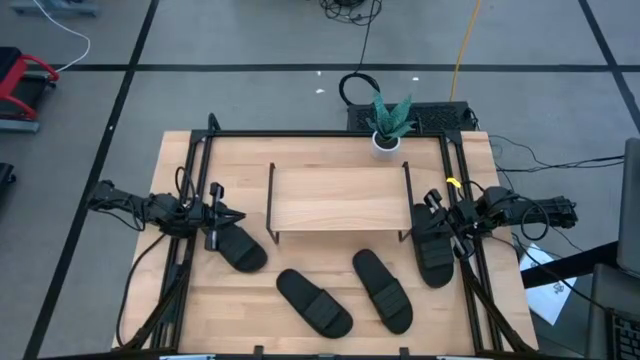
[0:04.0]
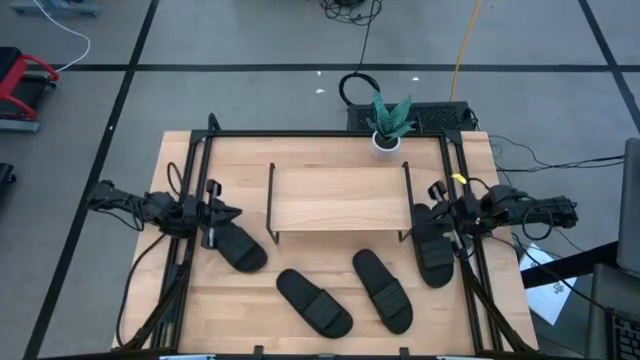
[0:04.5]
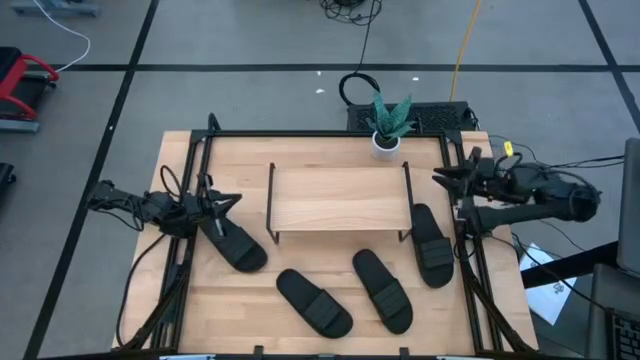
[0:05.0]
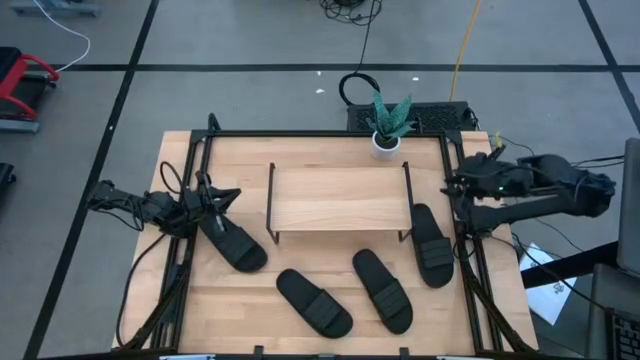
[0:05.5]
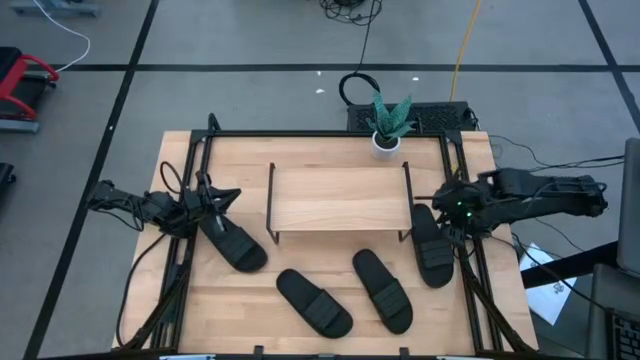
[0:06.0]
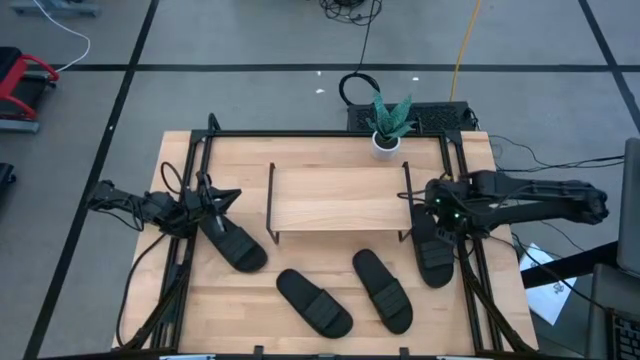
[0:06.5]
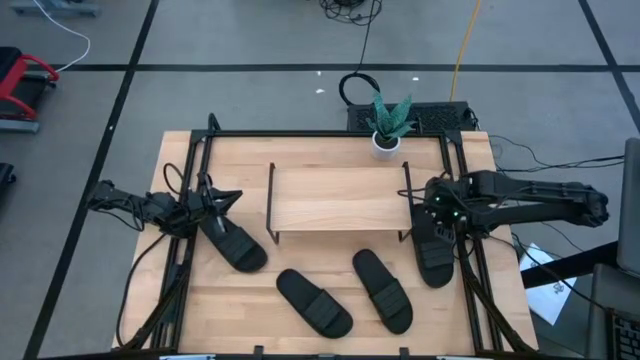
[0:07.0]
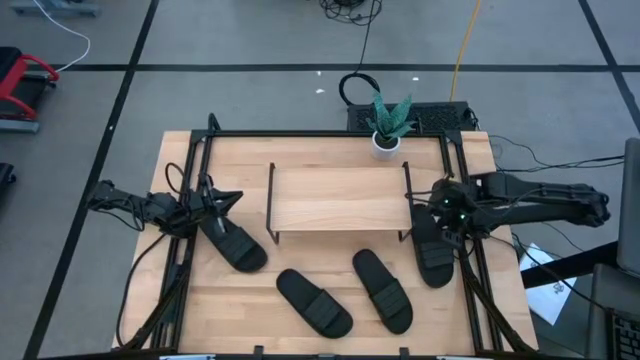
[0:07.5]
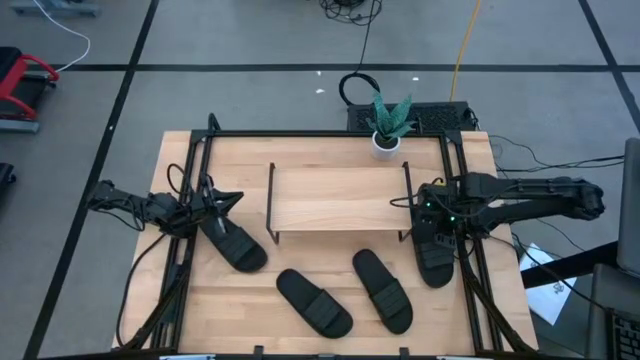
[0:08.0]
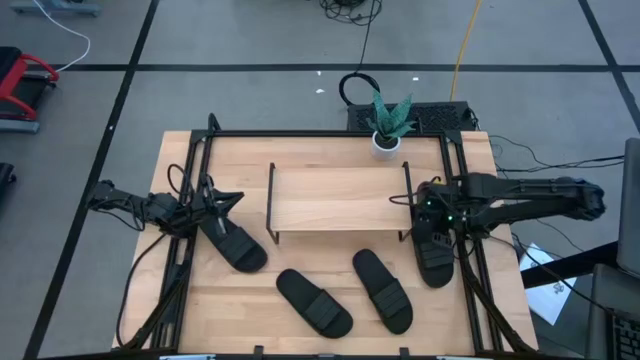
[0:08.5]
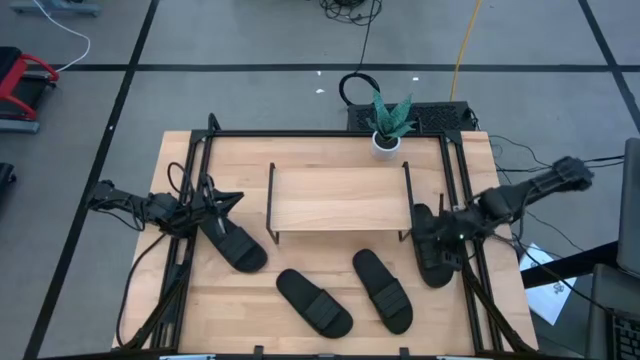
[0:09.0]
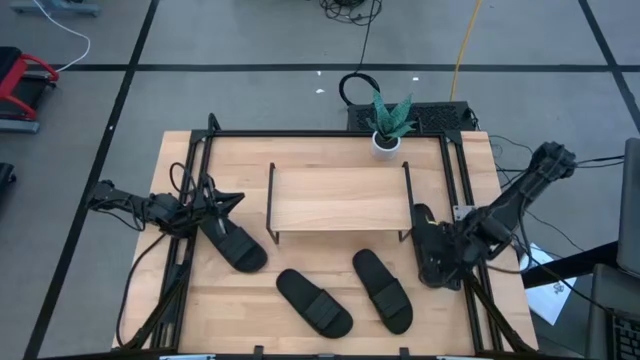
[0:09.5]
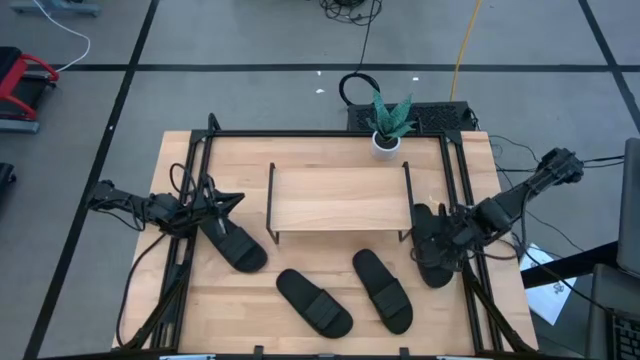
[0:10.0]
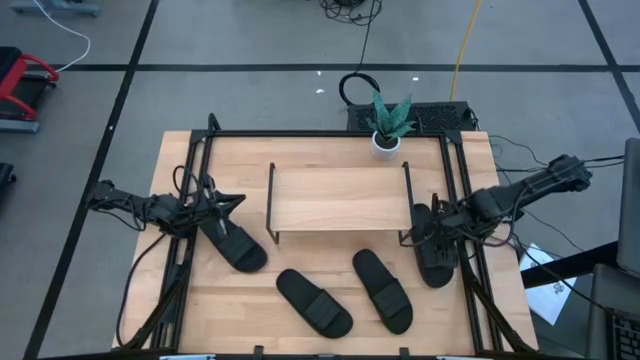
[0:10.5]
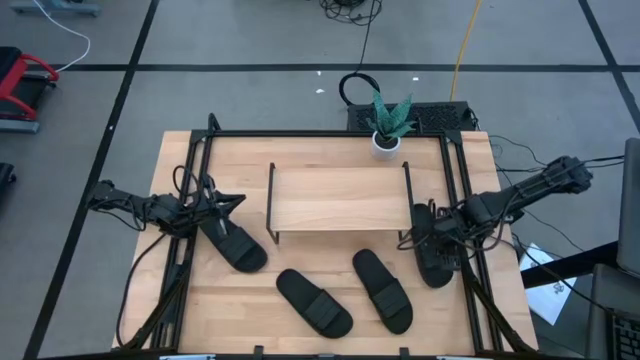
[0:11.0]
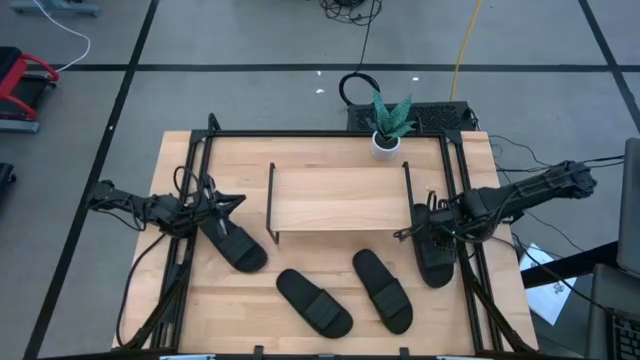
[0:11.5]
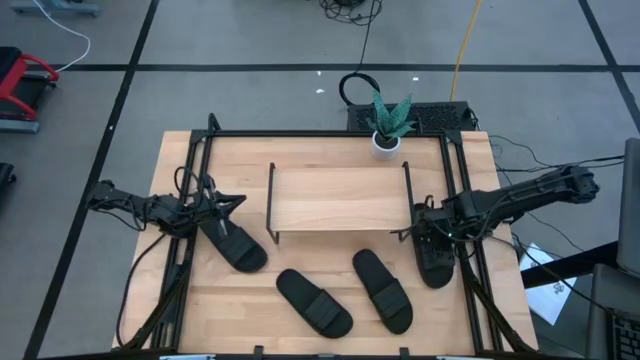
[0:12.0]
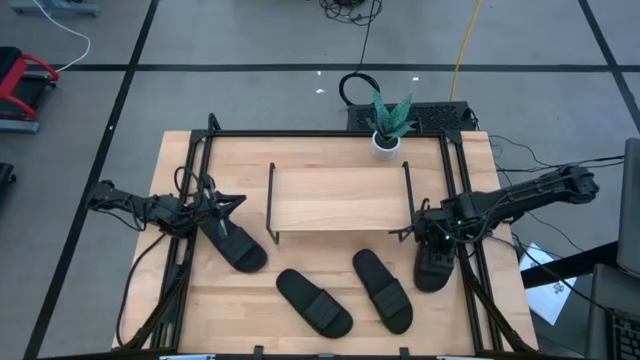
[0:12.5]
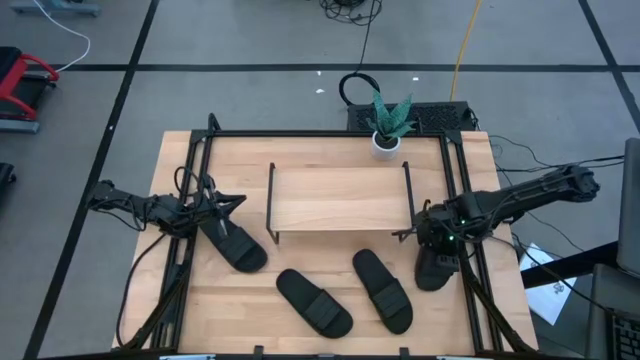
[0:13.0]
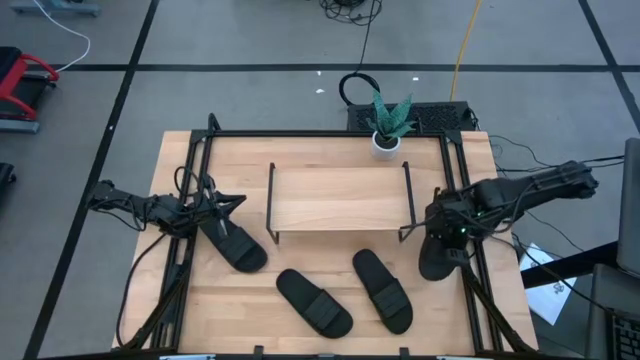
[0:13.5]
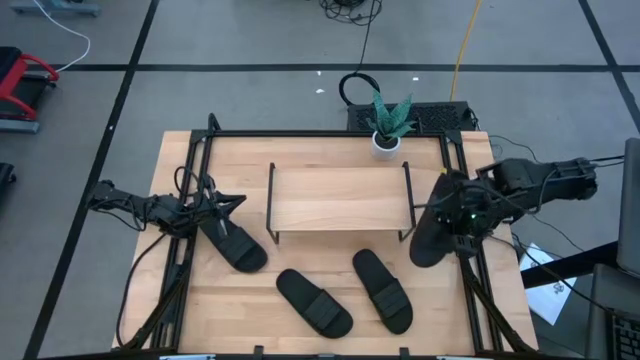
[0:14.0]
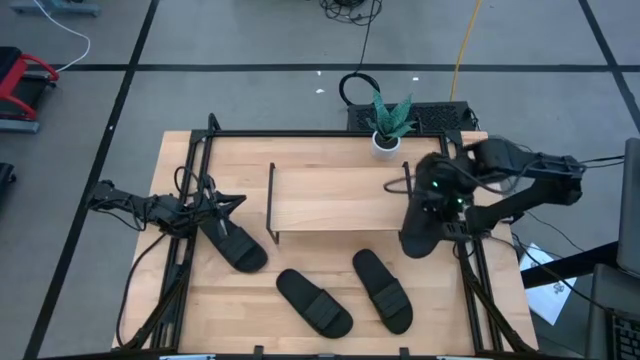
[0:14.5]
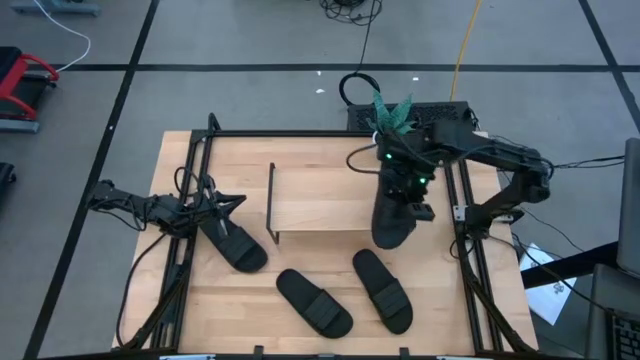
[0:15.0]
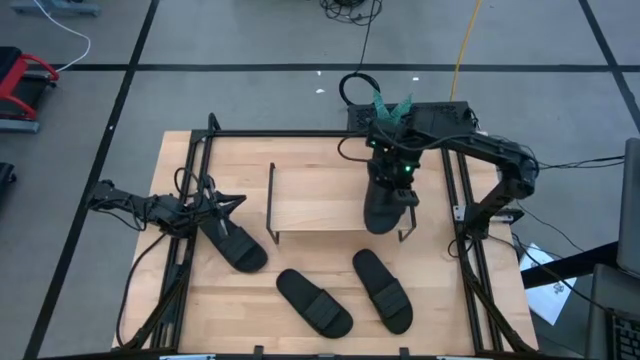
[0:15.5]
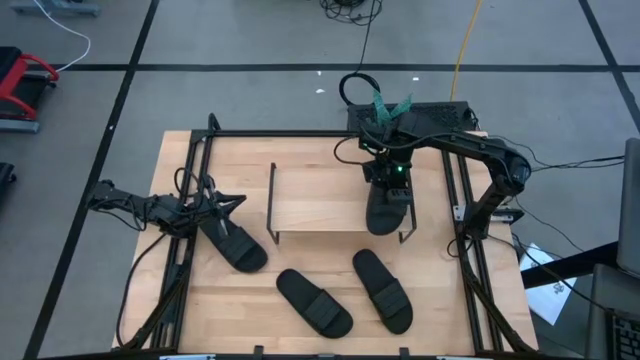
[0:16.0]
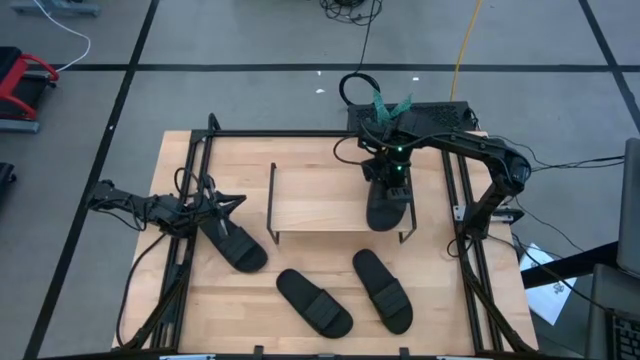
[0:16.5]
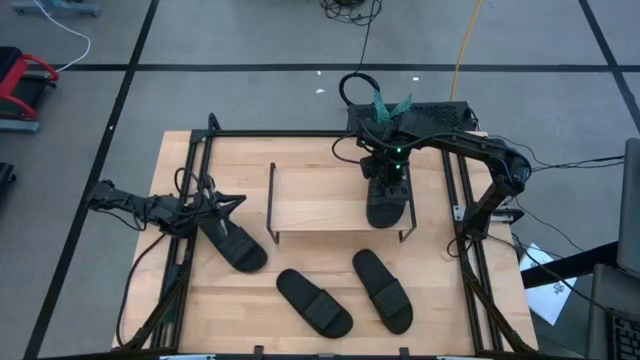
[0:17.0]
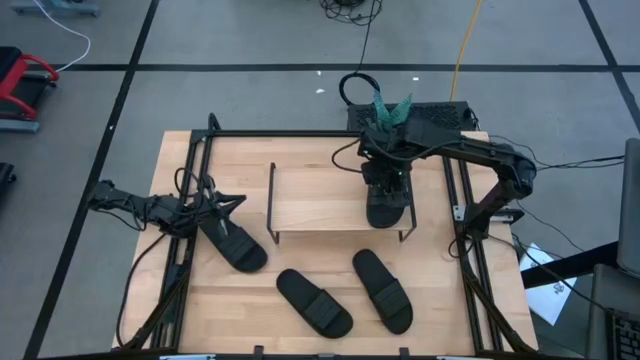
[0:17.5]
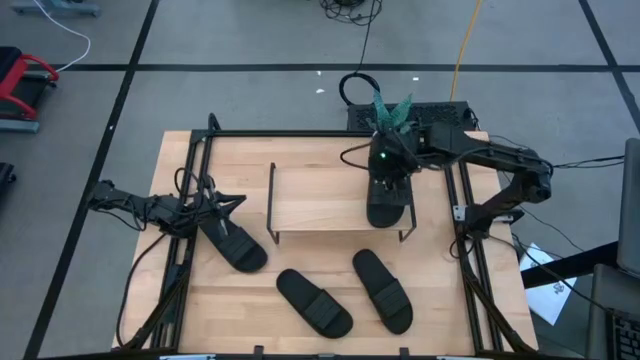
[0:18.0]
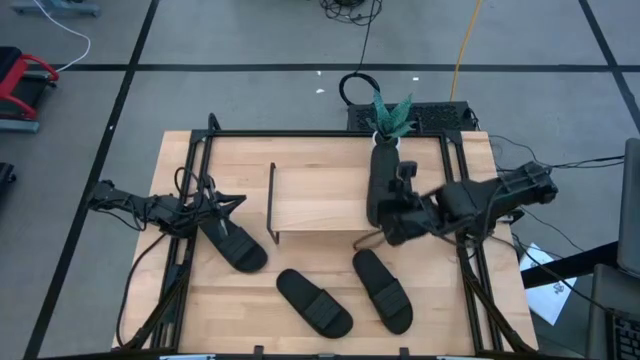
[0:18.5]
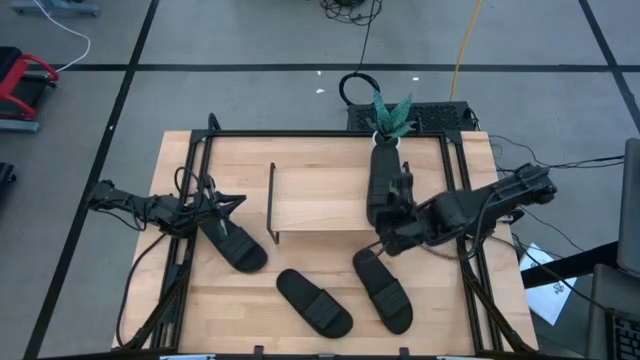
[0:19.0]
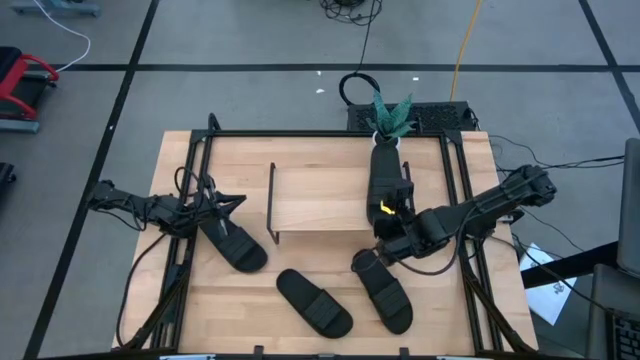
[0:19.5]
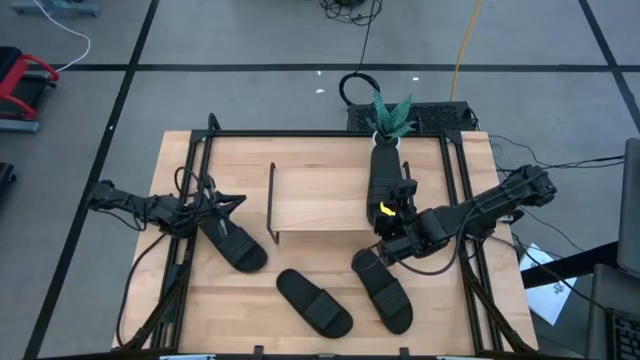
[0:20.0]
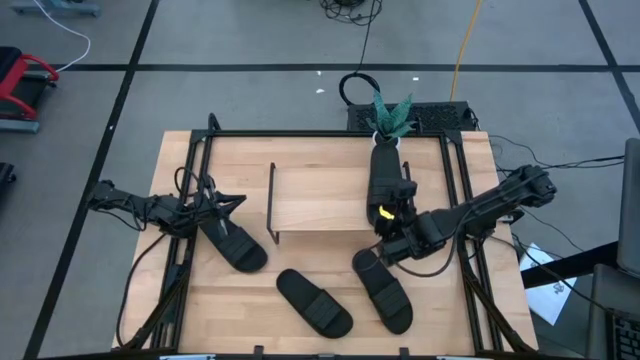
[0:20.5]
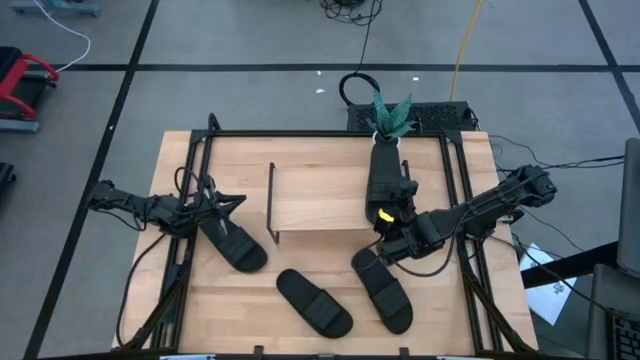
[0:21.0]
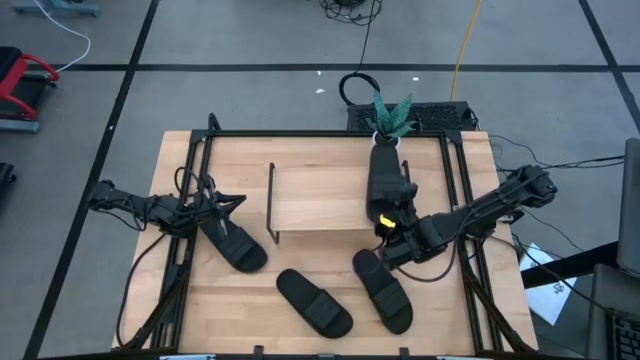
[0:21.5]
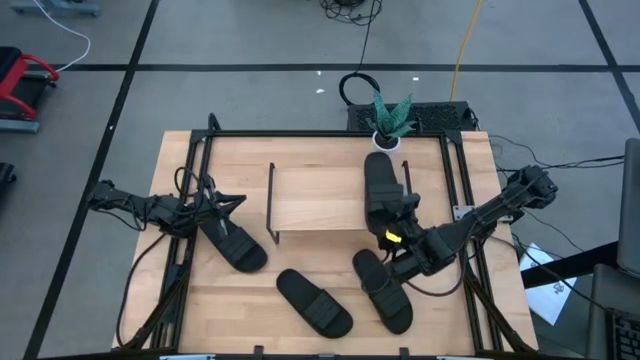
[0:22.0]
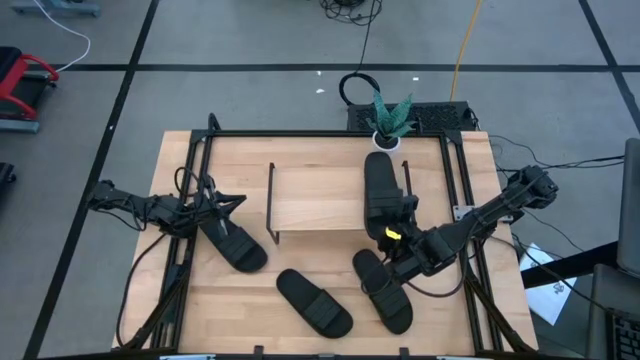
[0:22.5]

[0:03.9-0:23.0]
Task: Pick and place slides into the shelf
Put the black slipper on the shelf

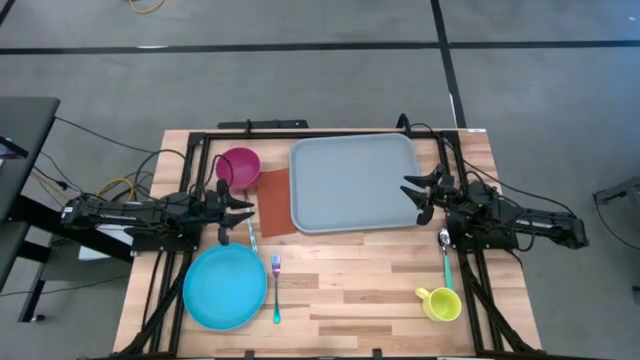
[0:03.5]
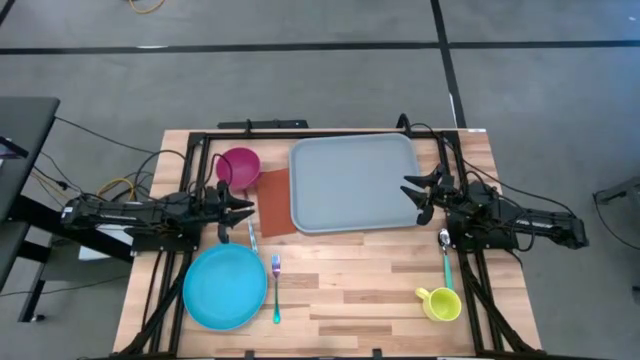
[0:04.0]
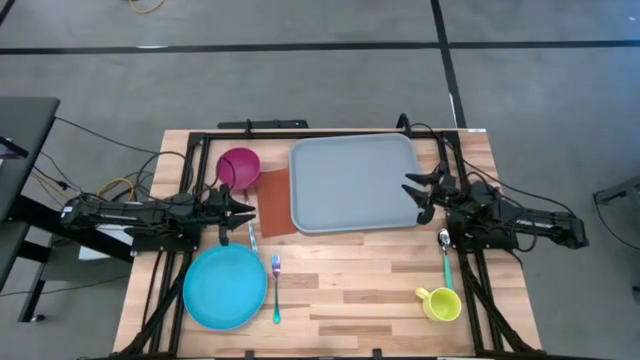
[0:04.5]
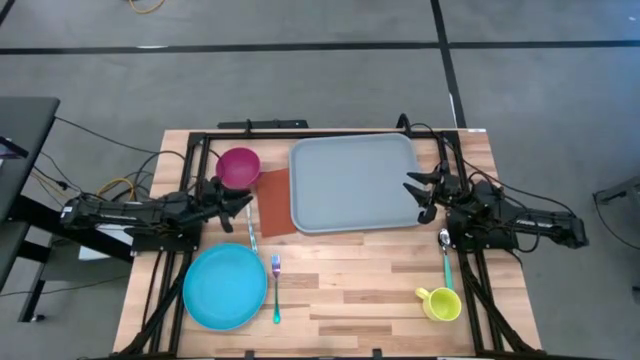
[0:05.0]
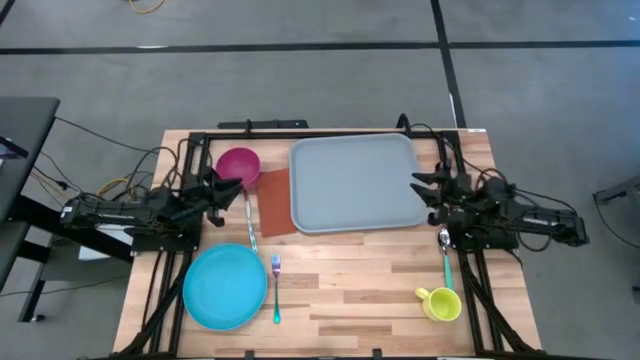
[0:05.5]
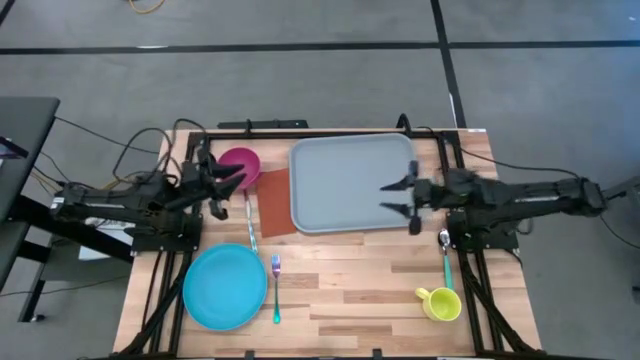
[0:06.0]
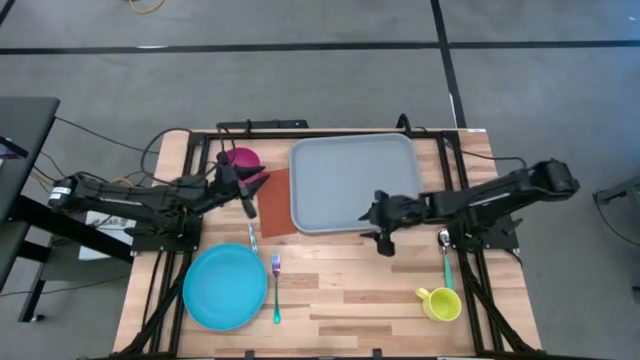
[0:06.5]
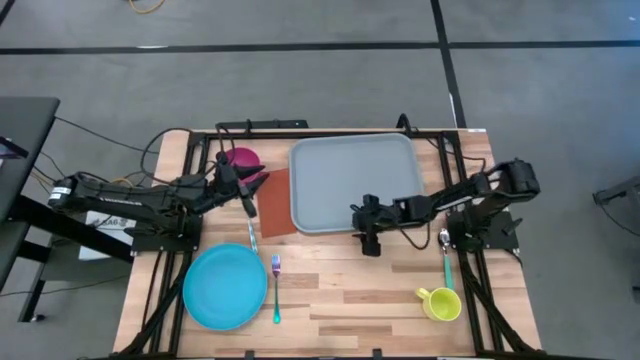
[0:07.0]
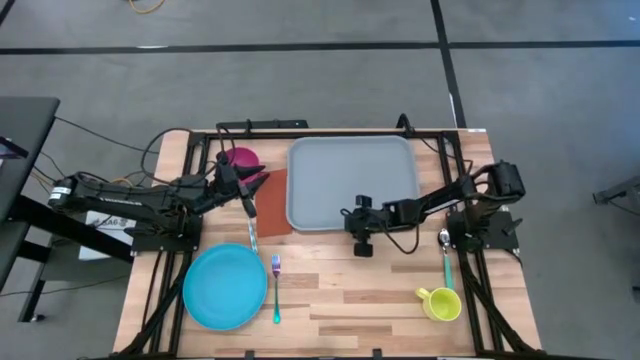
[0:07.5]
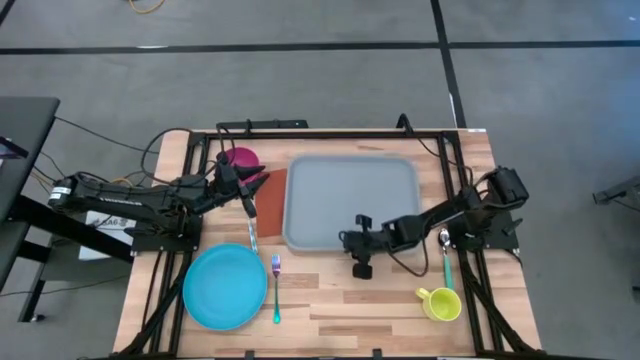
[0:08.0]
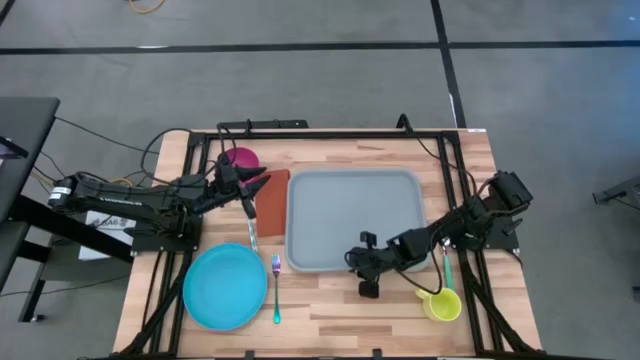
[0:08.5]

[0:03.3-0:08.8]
Task: Set up tray
Prepare the gray serving tray
